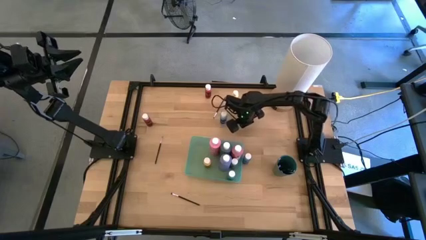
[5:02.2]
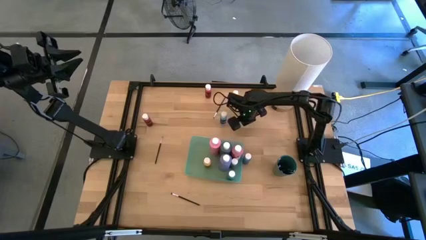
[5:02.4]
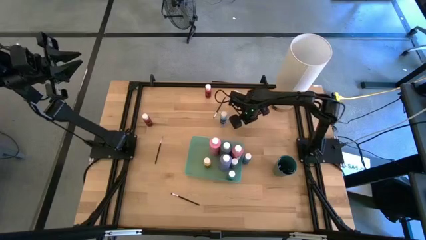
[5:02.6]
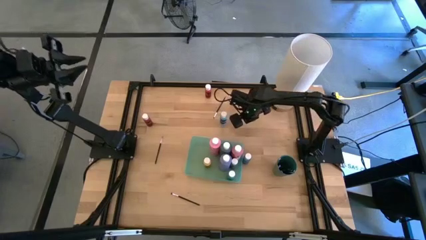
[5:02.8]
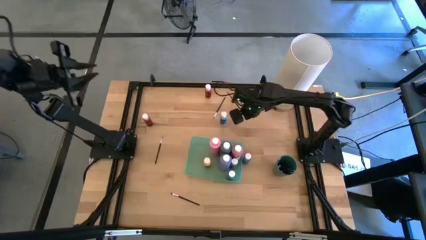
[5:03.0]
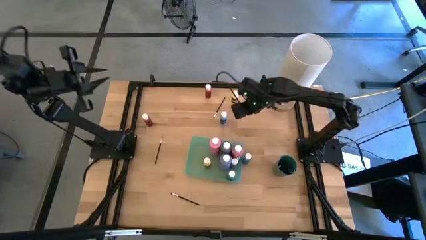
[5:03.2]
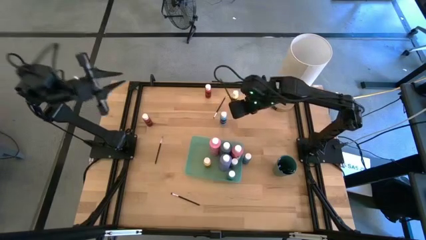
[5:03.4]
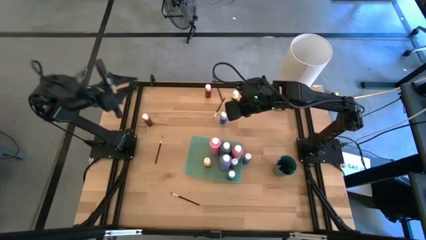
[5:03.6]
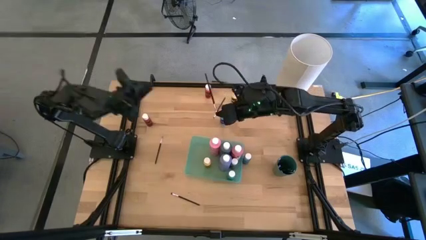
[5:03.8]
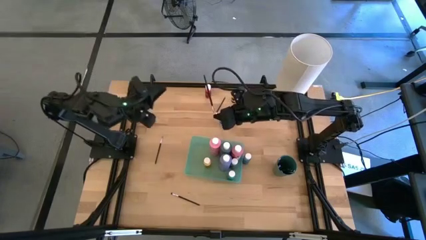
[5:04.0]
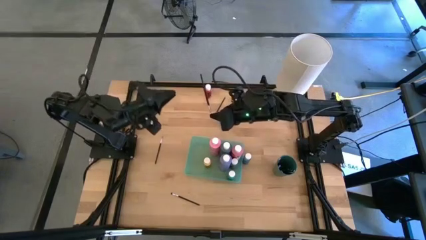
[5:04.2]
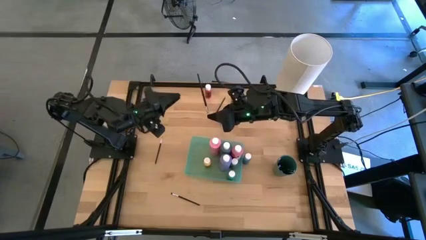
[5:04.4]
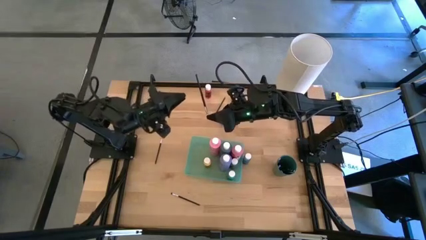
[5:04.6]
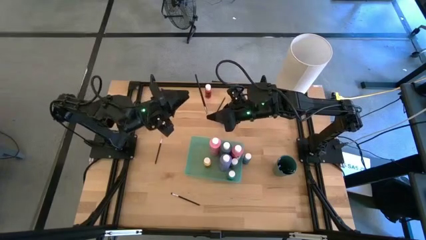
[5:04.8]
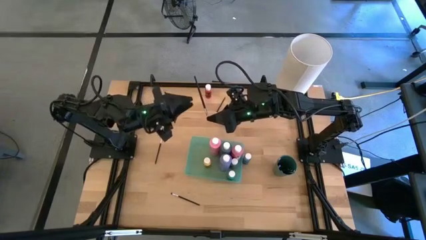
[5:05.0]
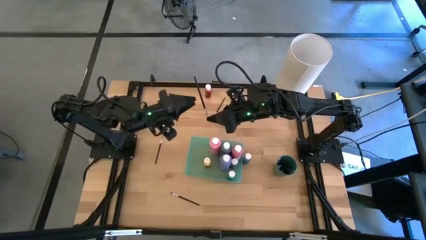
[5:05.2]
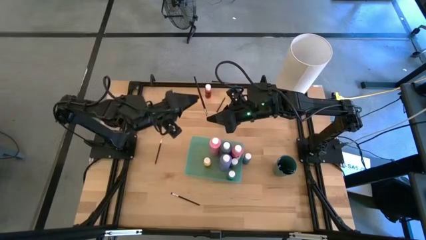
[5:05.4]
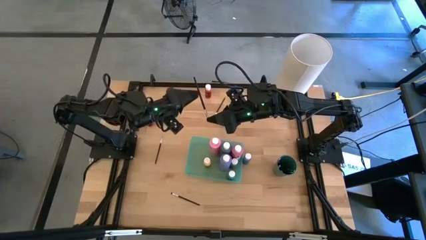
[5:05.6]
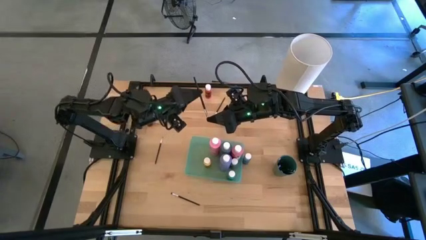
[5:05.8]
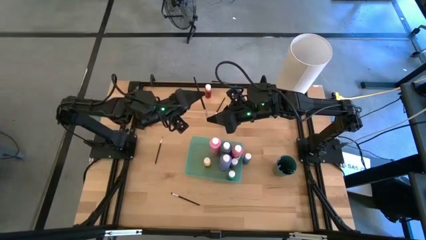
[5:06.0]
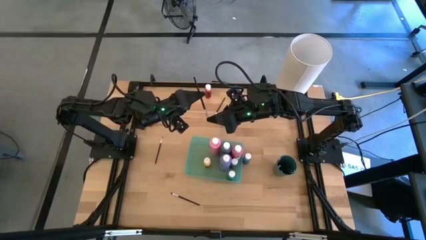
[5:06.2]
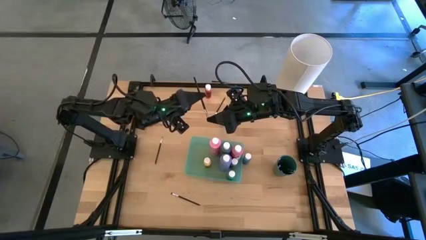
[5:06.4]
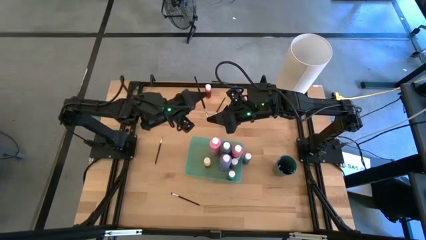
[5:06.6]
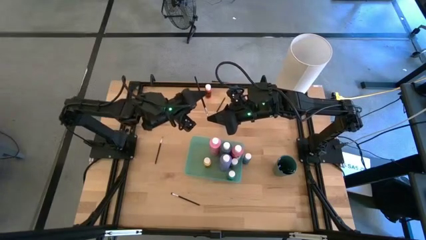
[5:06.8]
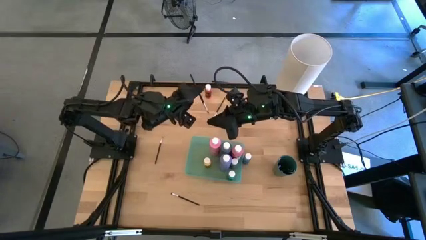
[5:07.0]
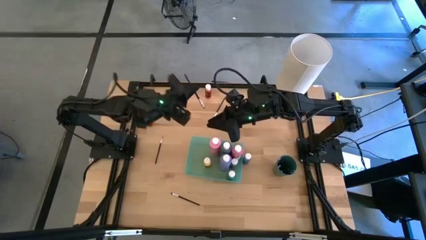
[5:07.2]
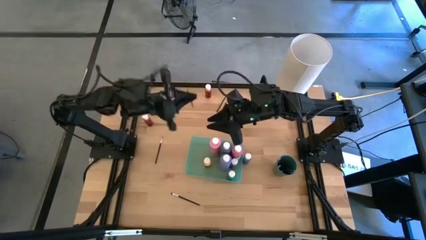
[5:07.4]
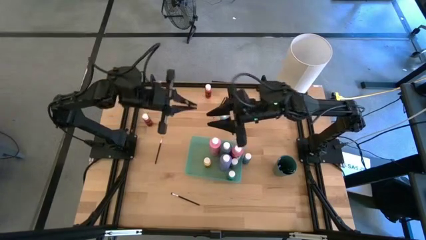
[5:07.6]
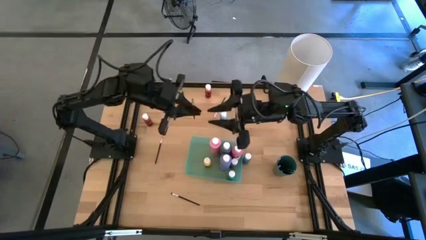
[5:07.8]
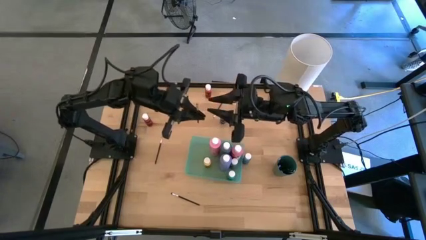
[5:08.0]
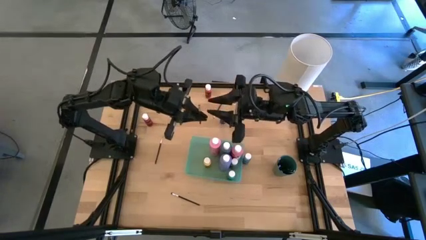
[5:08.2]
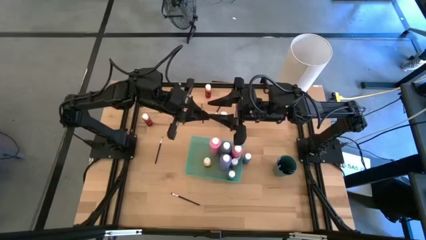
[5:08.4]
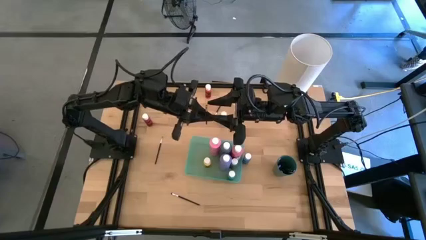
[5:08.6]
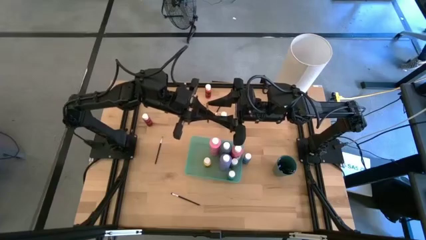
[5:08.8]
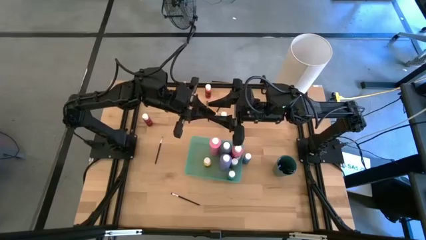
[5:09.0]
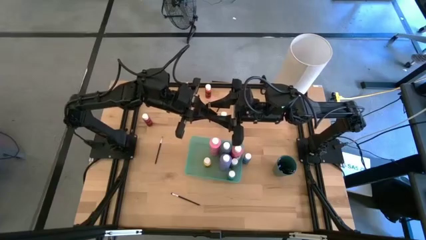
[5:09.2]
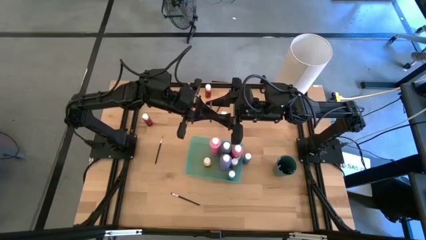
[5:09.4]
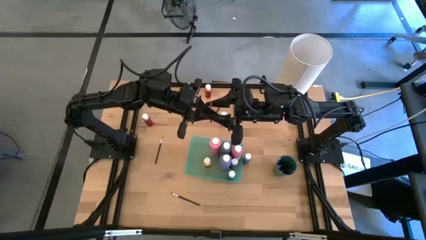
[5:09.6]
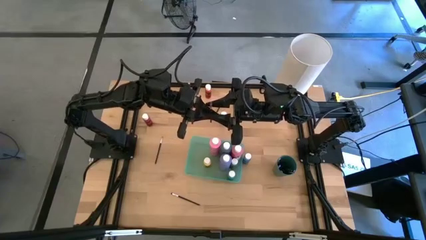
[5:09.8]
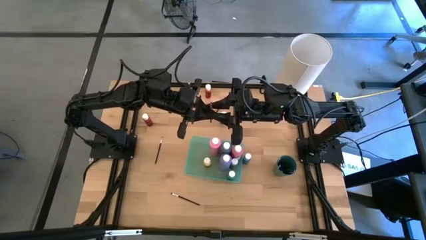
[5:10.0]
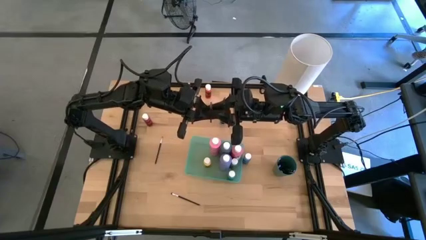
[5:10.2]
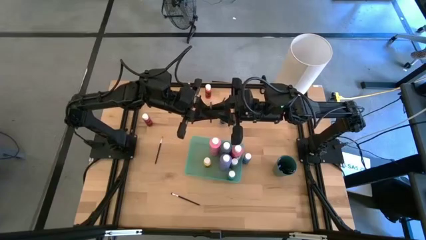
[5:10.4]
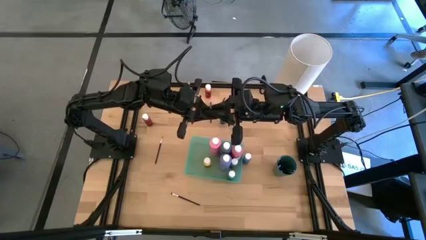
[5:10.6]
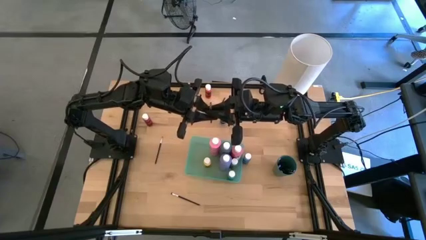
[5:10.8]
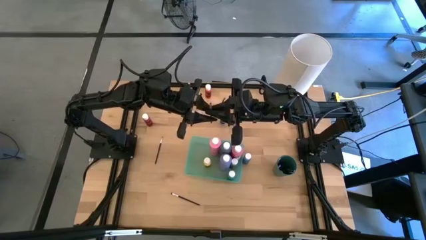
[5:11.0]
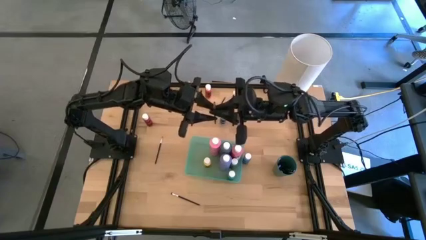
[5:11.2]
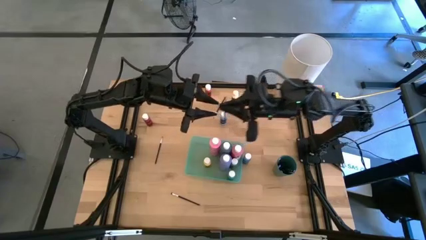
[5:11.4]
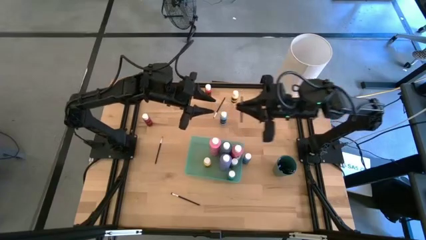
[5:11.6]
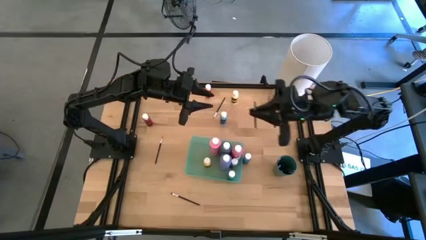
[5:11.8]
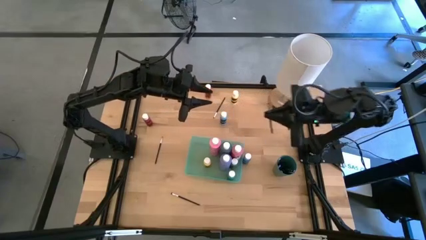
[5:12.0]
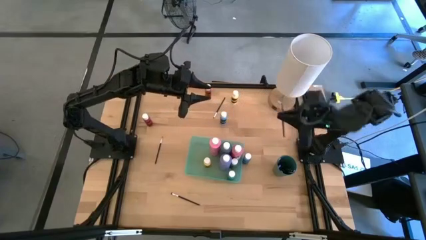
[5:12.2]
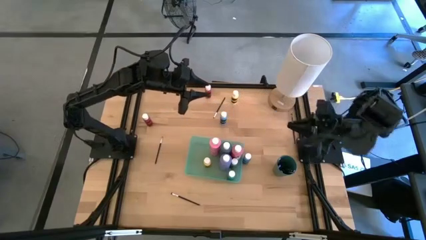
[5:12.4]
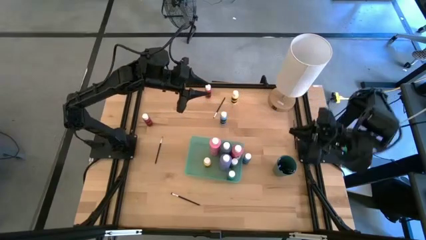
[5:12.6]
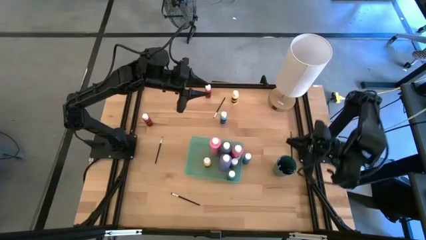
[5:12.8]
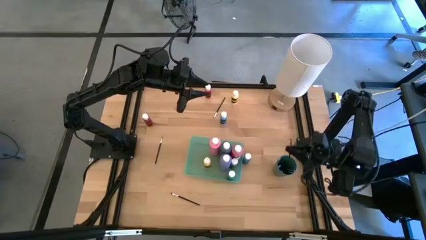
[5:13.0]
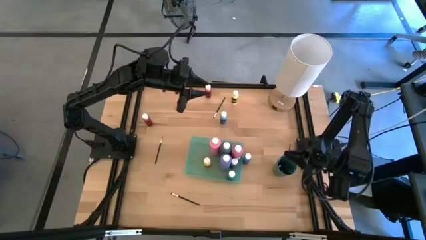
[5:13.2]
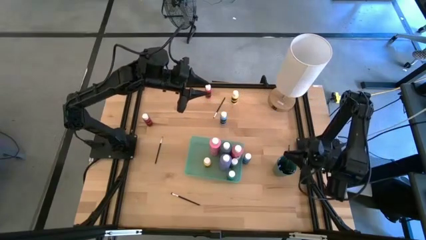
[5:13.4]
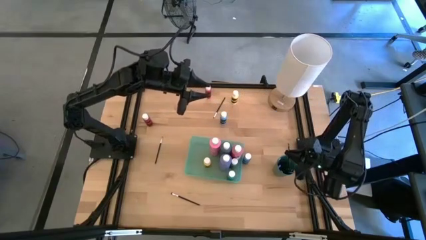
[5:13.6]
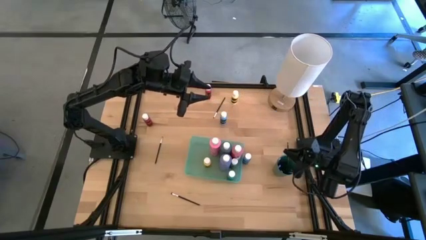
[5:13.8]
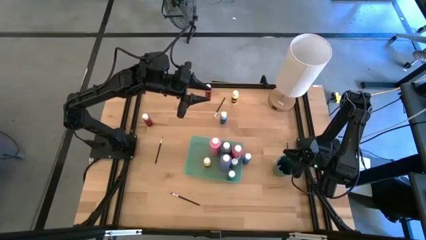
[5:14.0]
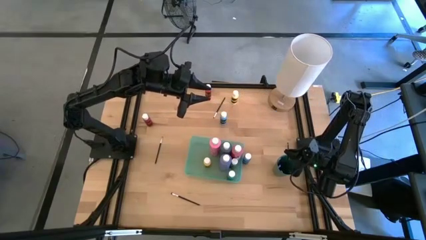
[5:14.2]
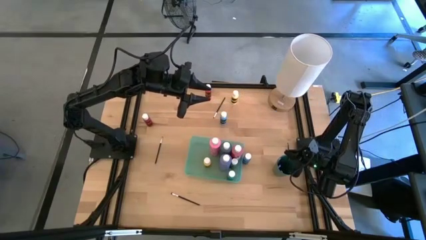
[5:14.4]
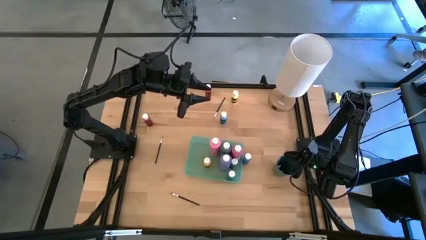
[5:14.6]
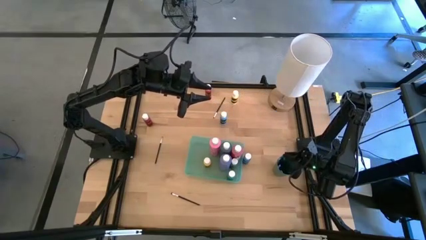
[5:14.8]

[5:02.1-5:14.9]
Task: Pick & Place Paint Supplies
Put the black eyeshadow brush into the green cup
